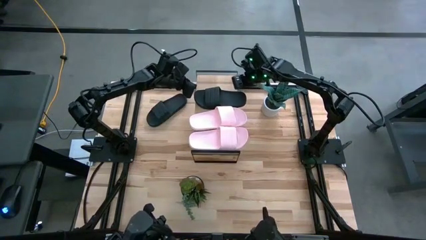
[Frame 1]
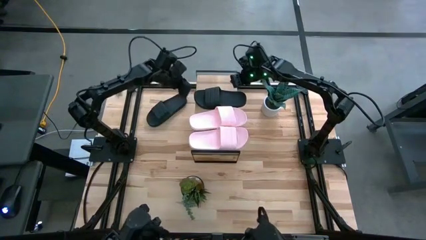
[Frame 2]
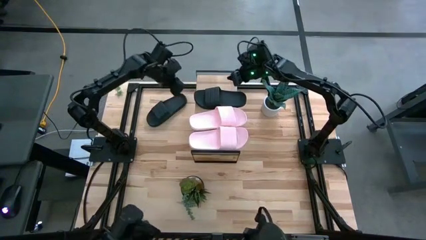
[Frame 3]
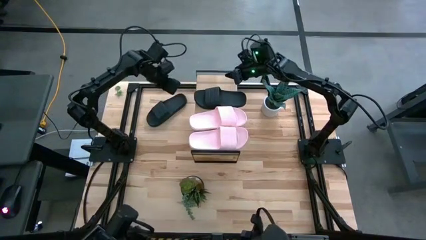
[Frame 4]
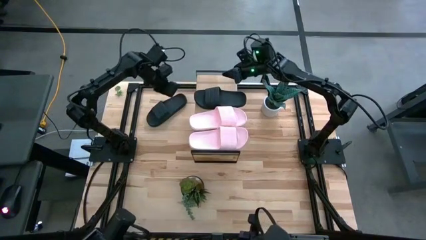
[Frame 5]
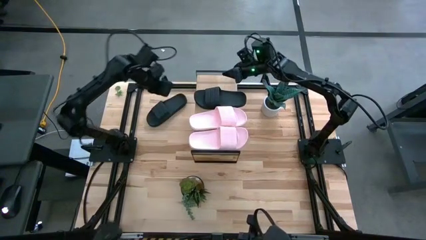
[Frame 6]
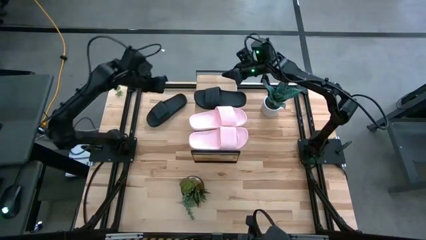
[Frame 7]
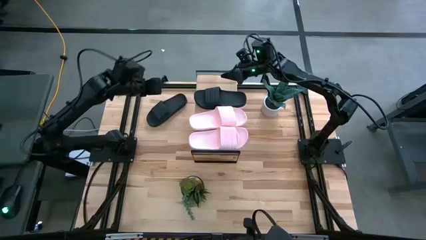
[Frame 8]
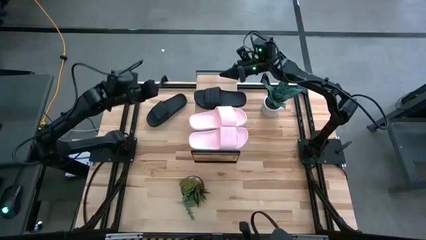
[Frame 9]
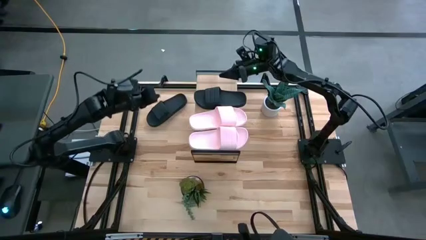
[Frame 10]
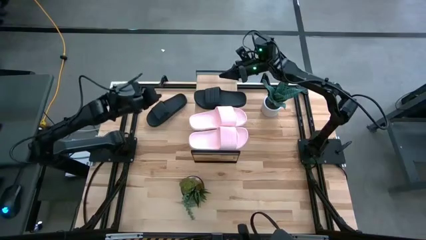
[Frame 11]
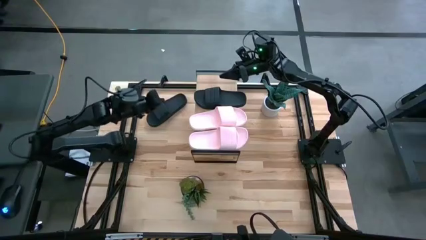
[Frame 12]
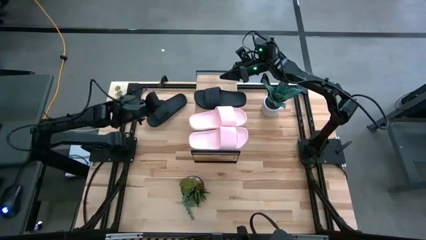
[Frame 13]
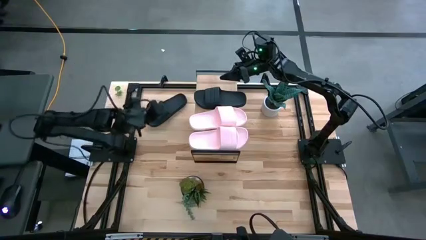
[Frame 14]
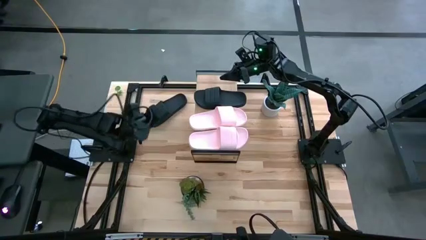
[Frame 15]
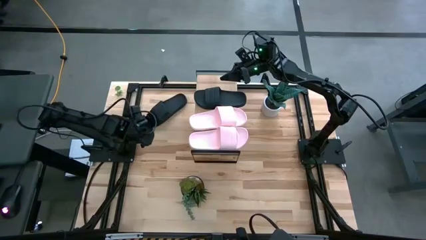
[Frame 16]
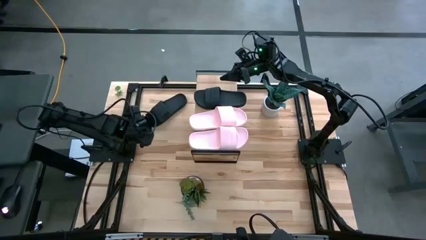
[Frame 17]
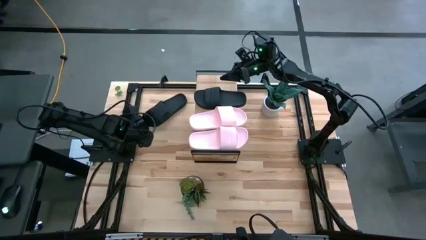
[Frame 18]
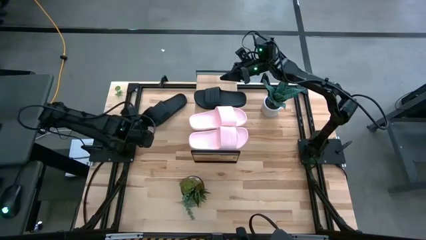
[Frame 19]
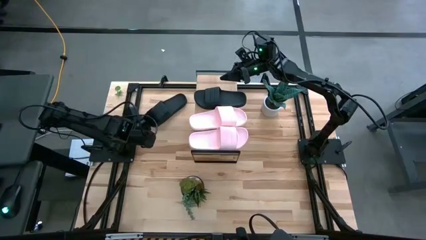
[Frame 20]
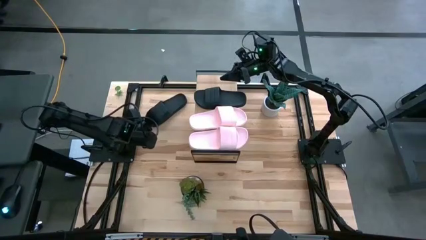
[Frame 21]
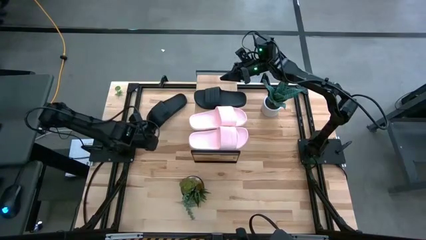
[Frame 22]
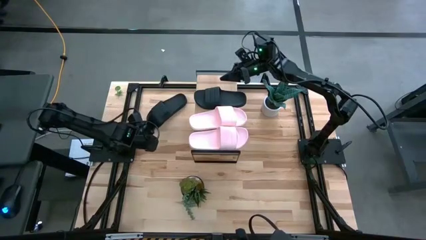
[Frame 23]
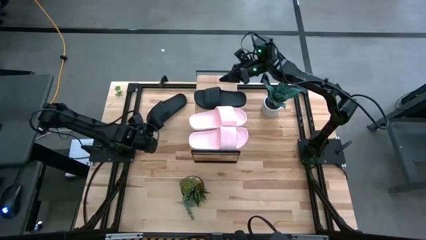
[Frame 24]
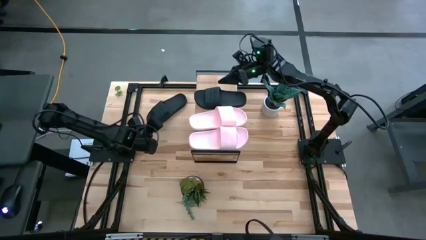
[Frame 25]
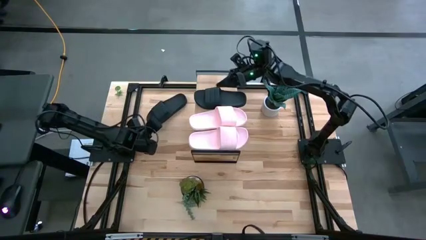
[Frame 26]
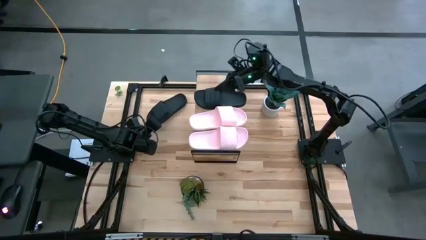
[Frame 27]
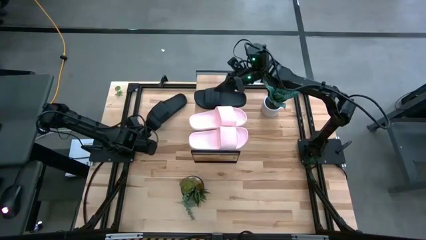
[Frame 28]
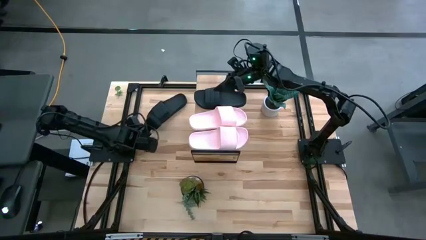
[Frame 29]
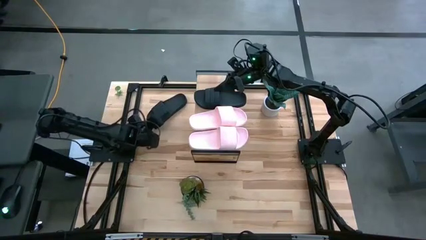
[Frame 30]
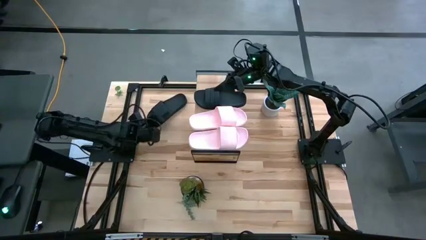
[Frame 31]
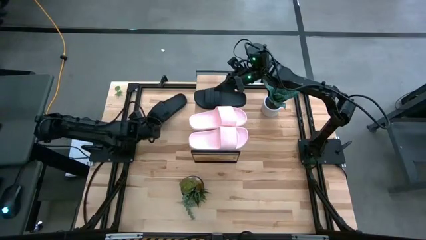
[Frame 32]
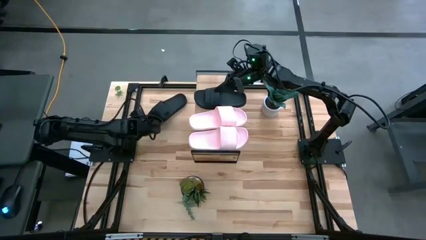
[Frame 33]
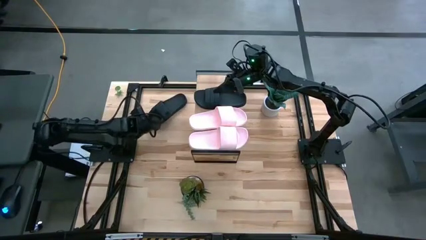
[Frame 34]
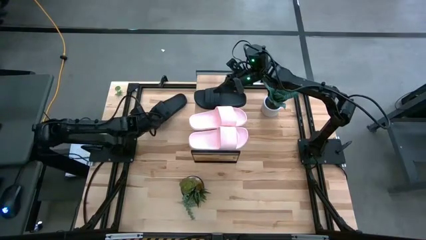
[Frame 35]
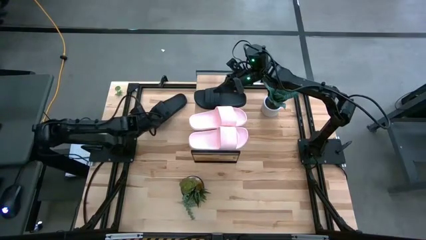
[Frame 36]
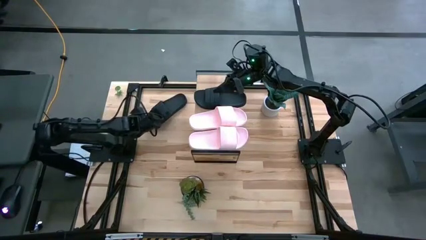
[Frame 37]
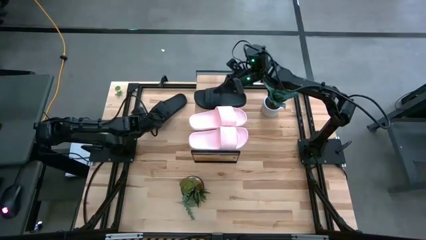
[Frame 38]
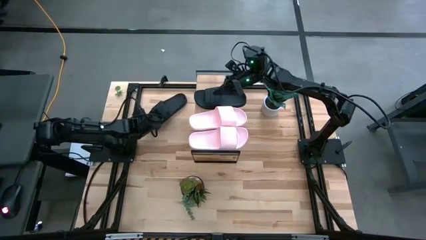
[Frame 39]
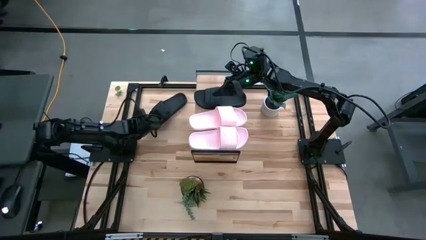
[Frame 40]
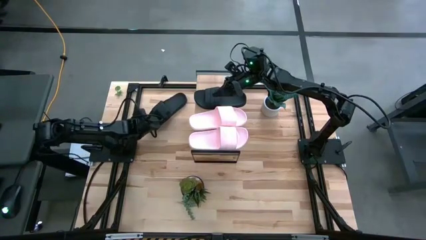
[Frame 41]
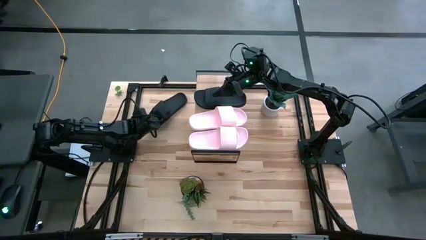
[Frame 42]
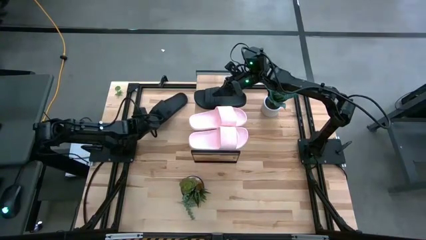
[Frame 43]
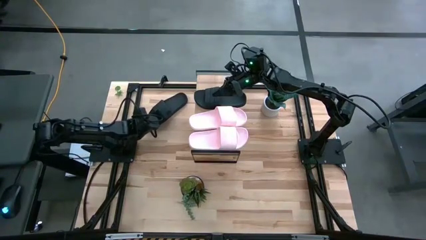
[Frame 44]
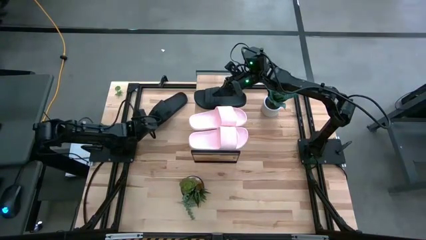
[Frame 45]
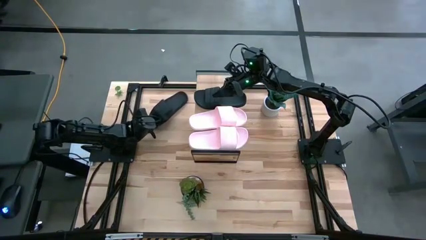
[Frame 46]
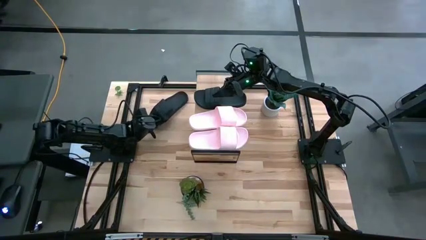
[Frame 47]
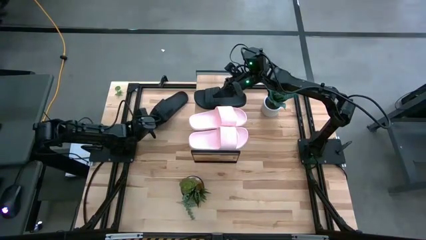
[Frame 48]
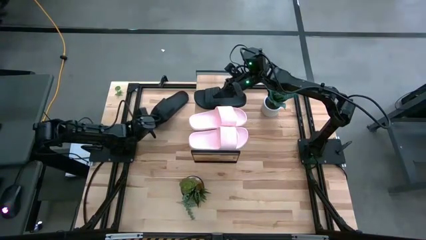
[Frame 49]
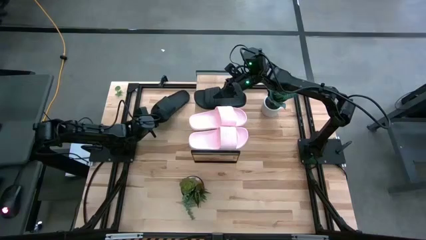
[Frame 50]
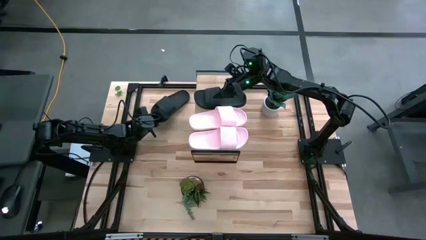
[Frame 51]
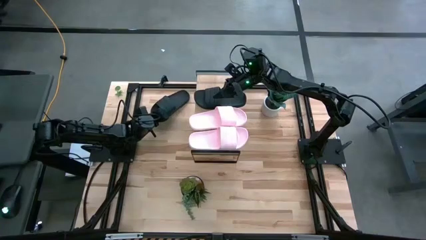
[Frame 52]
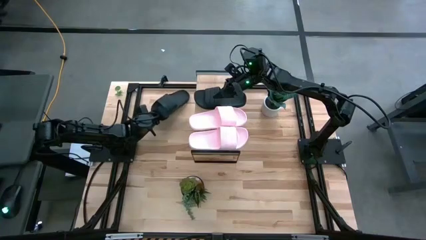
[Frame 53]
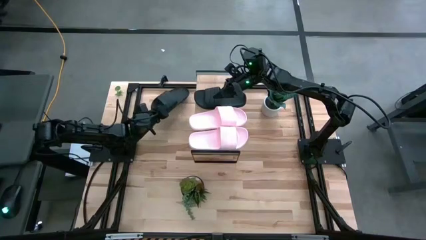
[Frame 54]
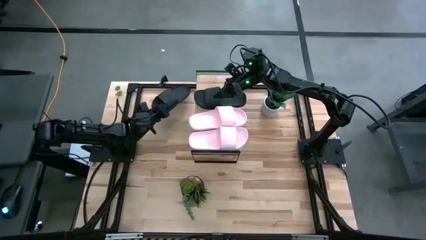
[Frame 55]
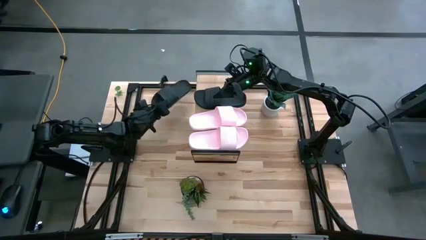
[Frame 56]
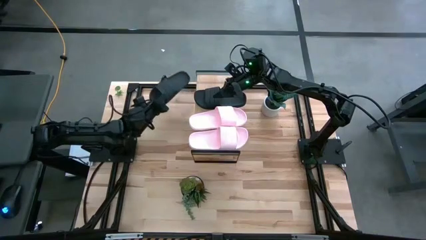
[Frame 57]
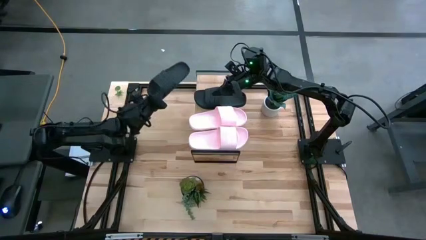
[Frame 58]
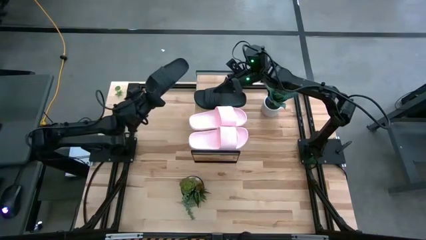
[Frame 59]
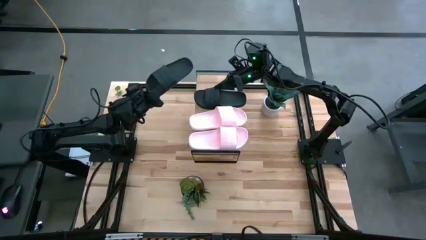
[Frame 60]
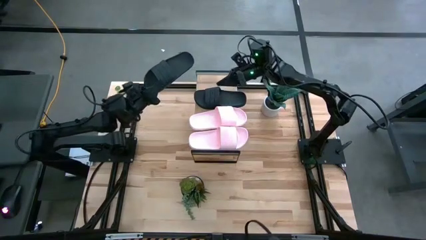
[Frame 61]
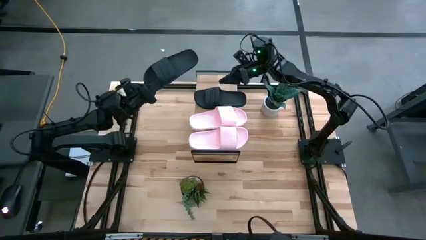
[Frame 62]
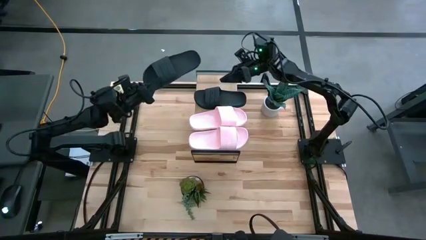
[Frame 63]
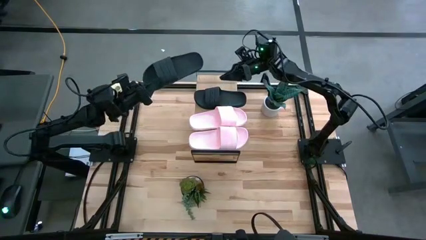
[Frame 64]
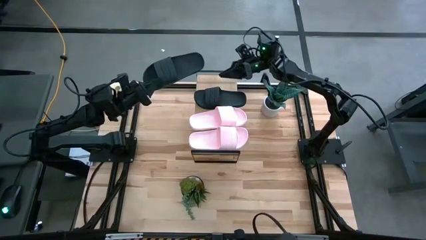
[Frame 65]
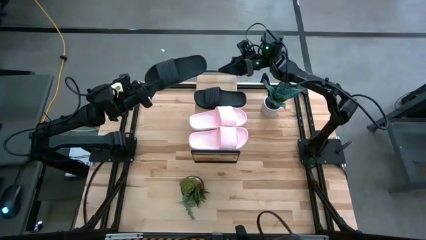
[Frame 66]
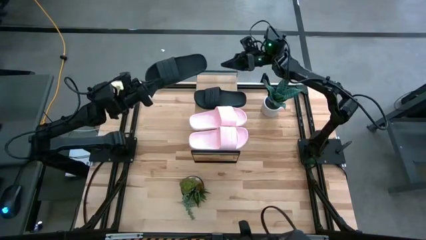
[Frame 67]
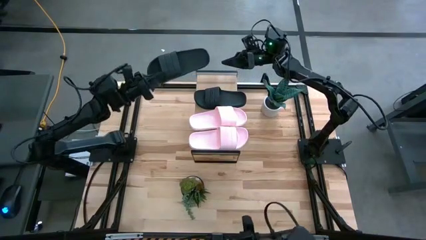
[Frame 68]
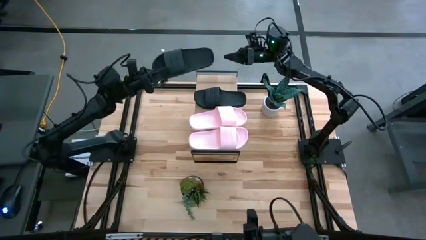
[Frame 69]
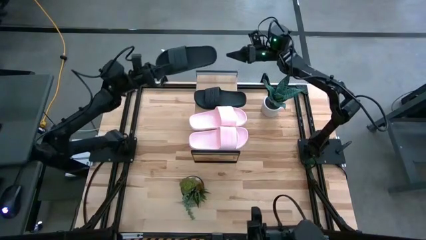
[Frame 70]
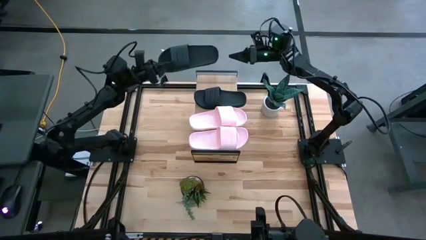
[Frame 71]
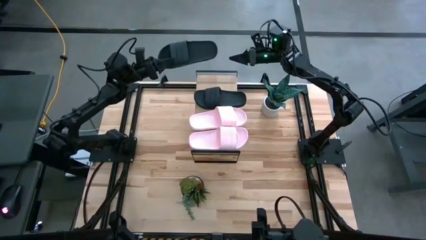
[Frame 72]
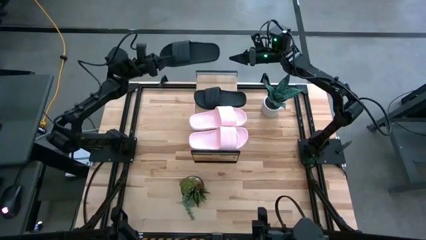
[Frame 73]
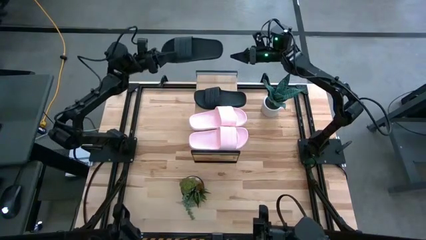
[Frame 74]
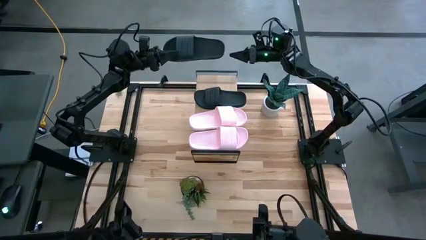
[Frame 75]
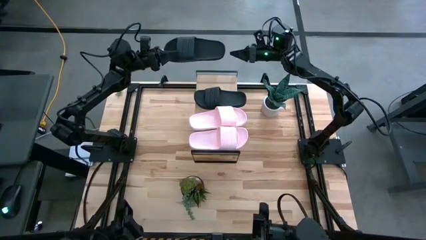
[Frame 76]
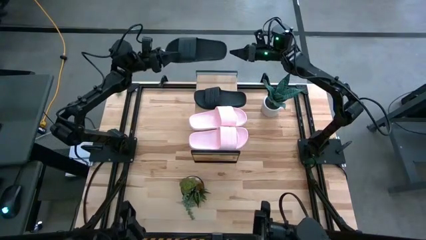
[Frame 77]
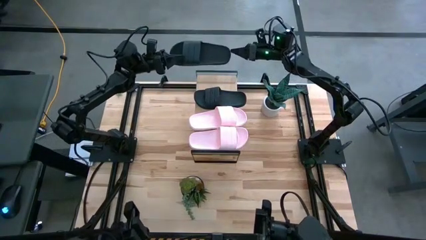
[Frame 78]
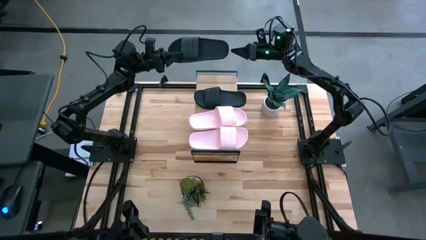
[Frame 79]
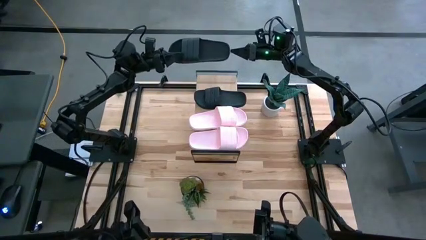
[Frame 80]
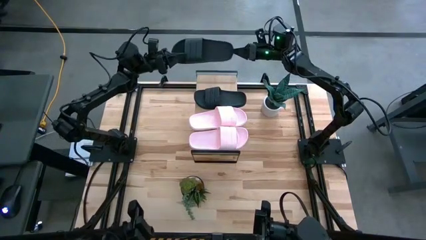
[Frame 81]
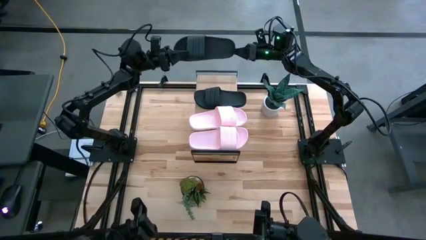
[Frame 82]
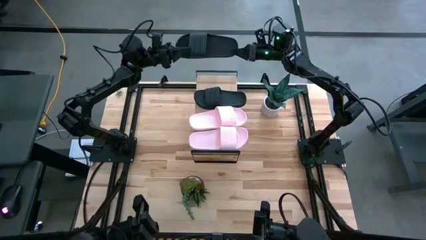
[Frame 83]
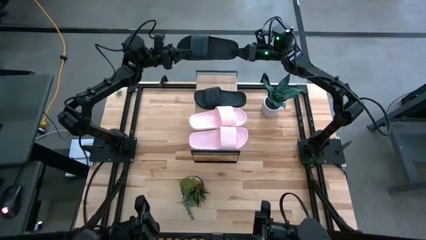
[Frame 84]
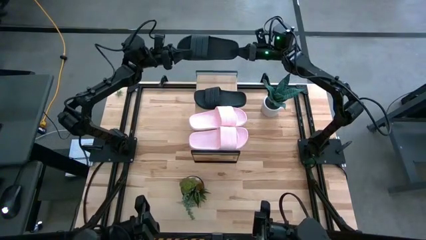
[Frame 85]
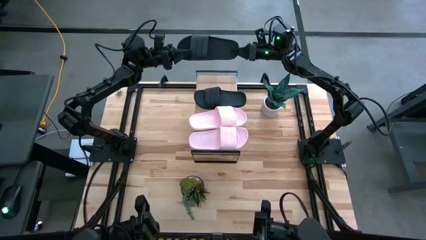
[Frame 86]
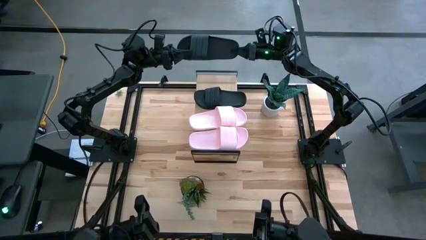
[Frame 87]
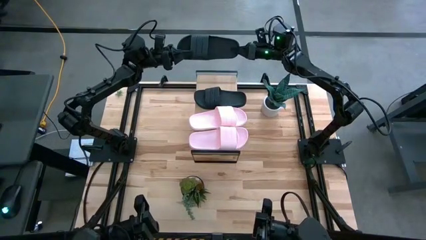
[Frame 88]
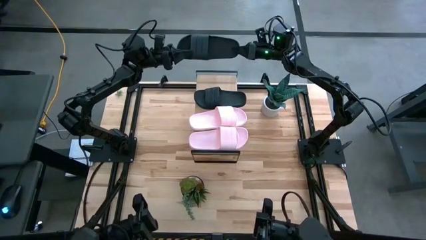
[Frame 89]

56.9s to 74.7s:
Task: Pick and place slides into the shelf
Put the black slide on the shelf
